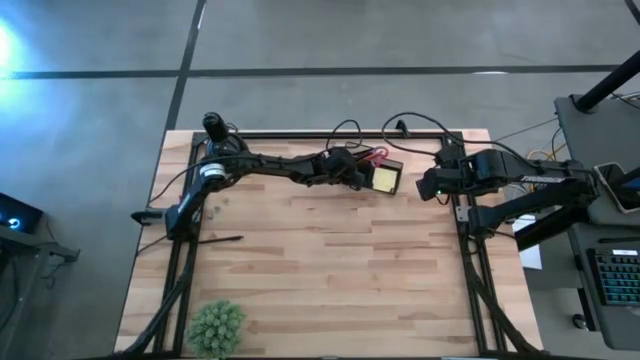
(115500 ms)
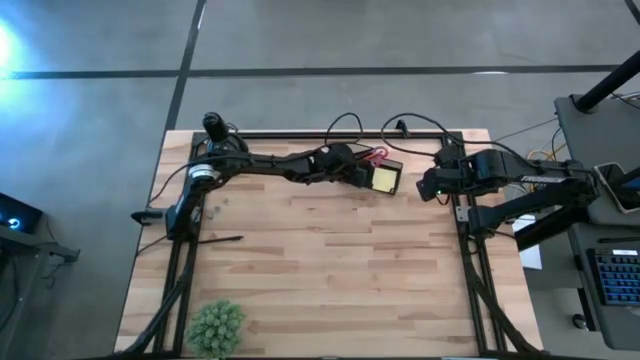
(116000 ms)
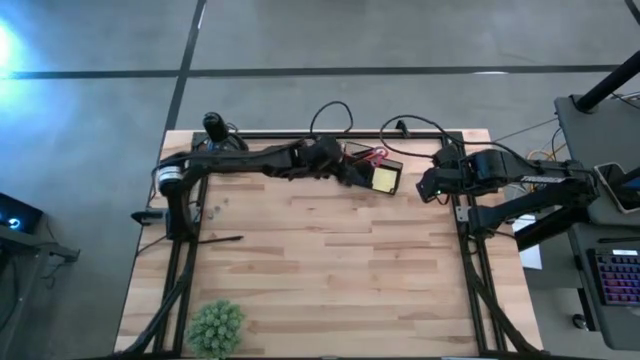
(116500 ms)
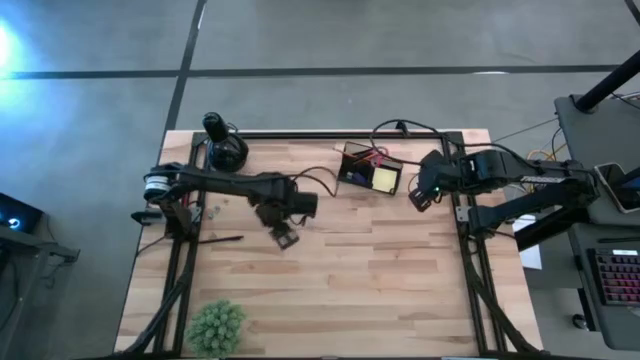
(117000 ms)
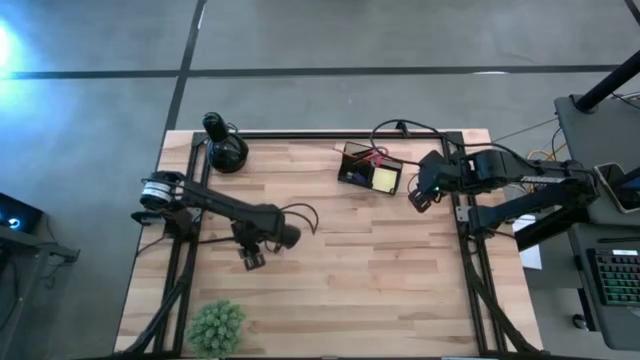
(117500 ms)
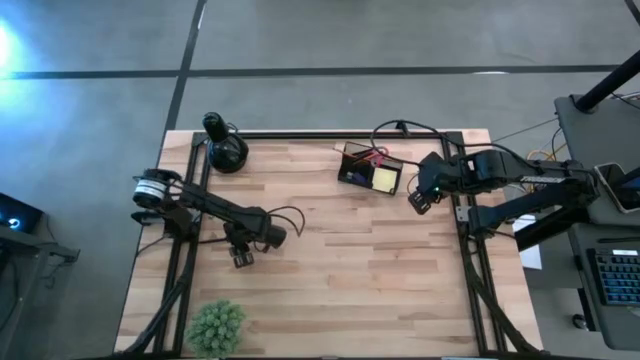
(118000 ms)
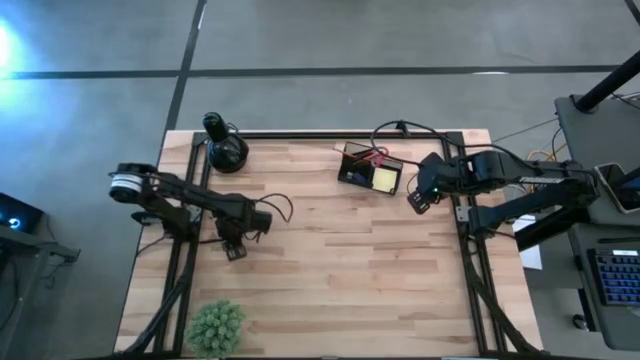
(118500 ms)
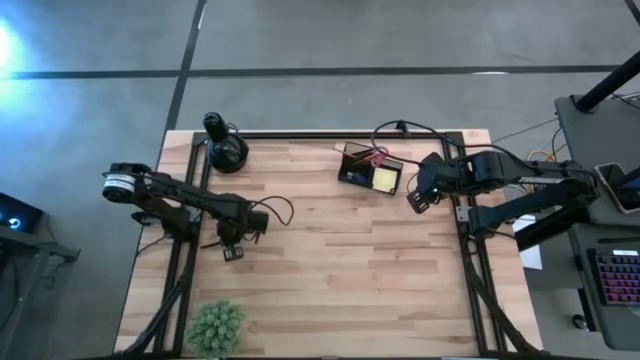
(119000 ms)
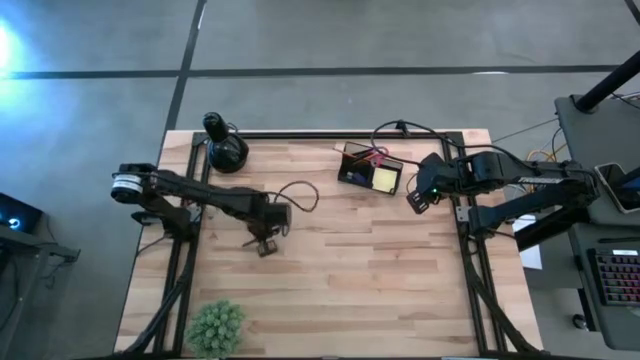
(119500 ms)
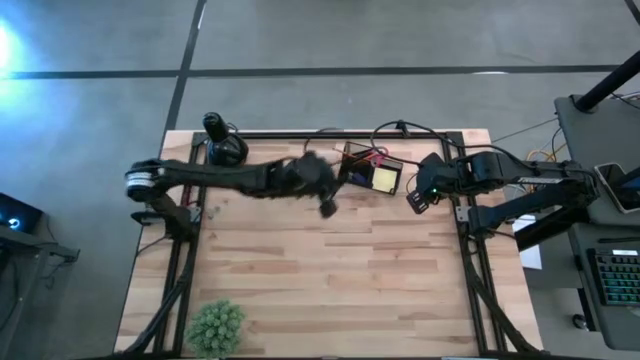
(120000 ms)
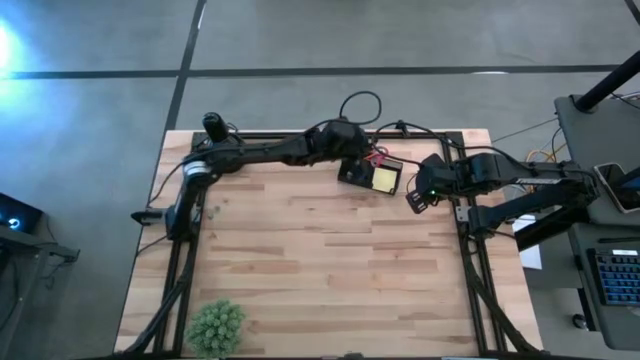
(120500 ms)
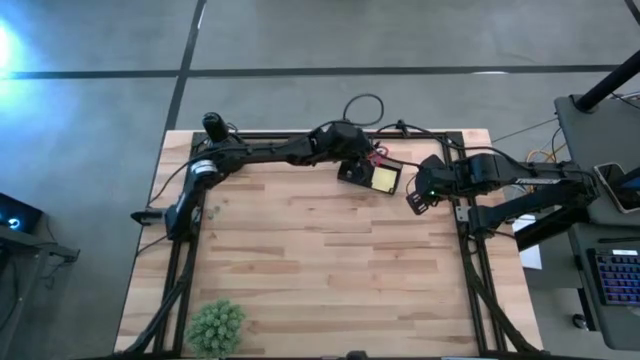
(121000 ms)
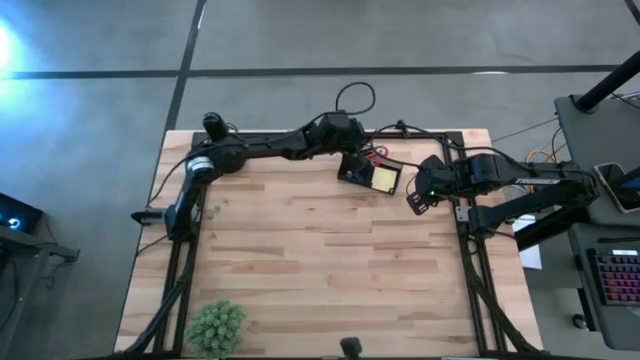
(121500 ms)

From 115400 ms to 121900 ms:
Task: Pick and place office supplies into organizer
Put the black pen into the desk organizer

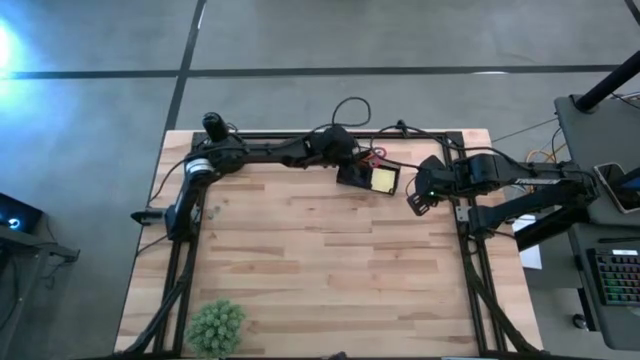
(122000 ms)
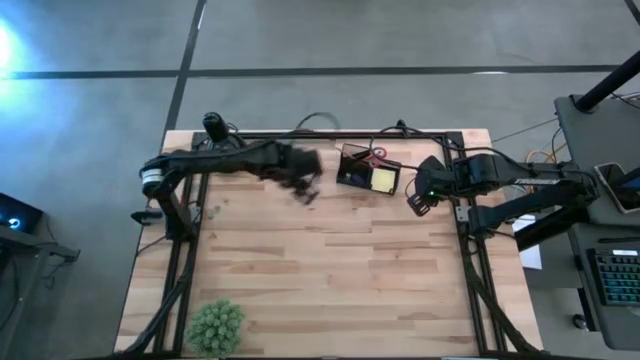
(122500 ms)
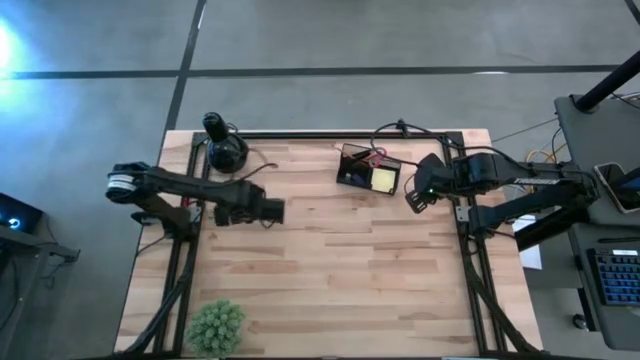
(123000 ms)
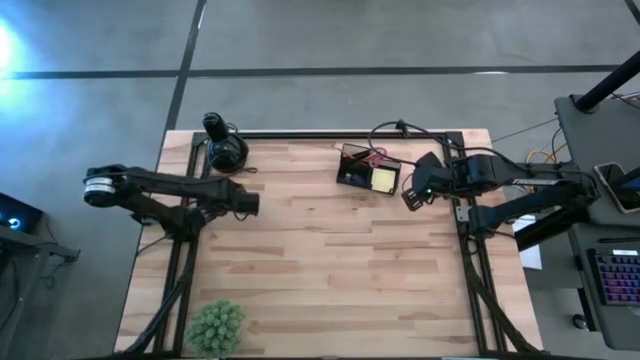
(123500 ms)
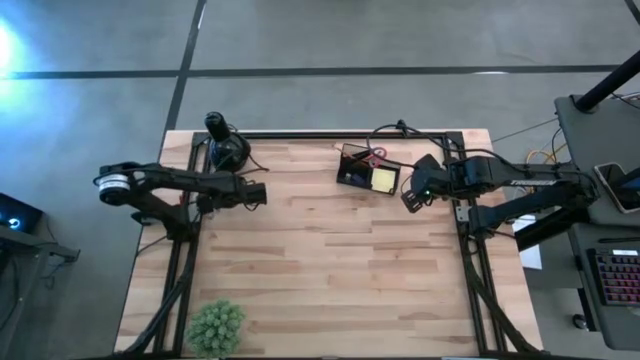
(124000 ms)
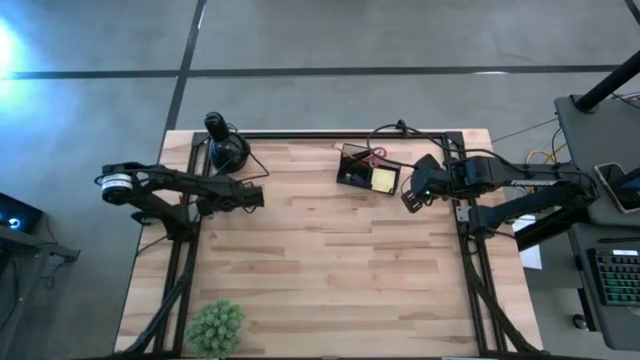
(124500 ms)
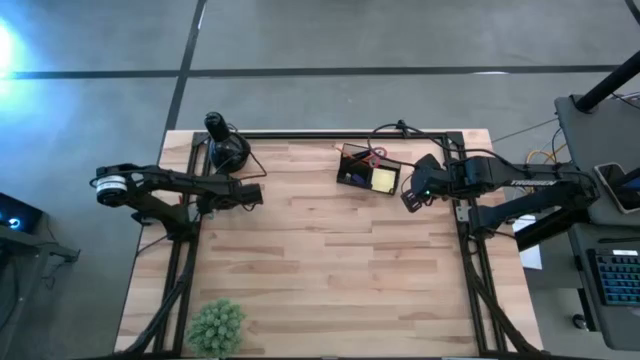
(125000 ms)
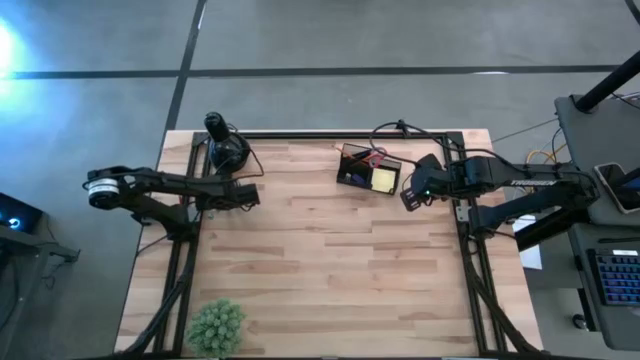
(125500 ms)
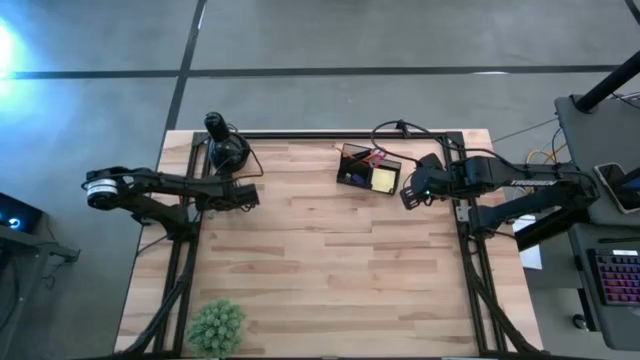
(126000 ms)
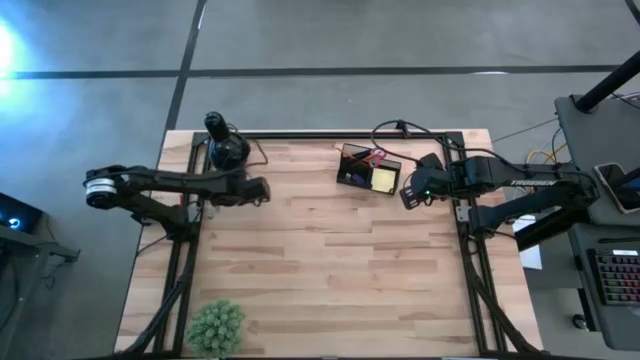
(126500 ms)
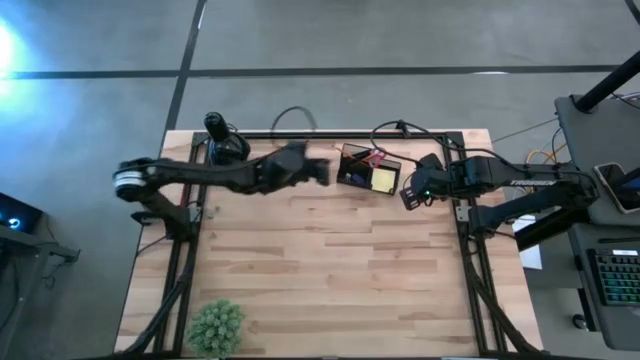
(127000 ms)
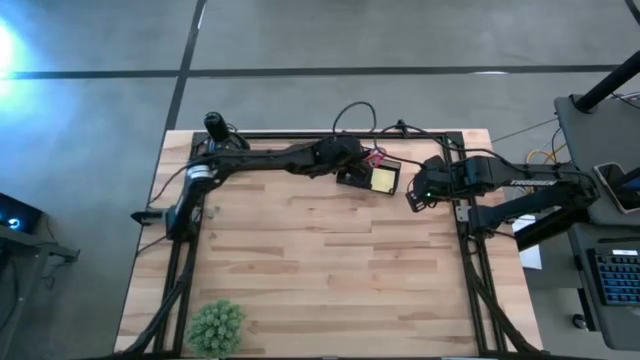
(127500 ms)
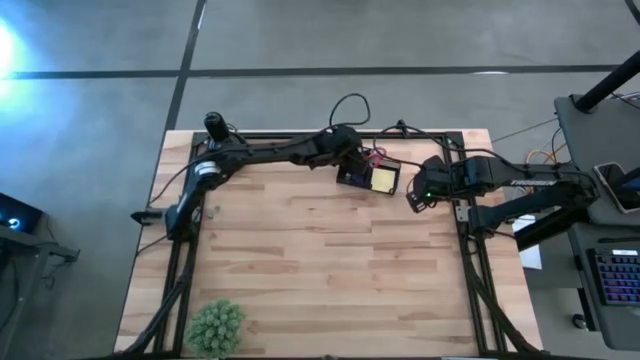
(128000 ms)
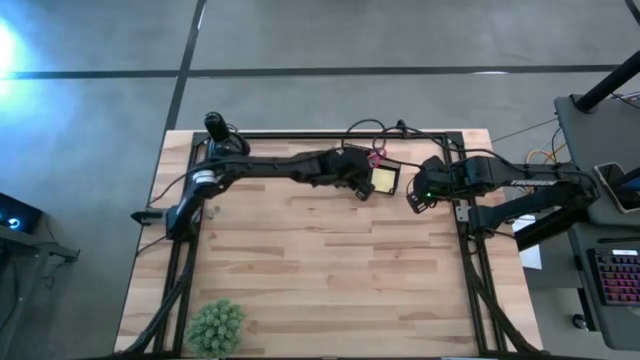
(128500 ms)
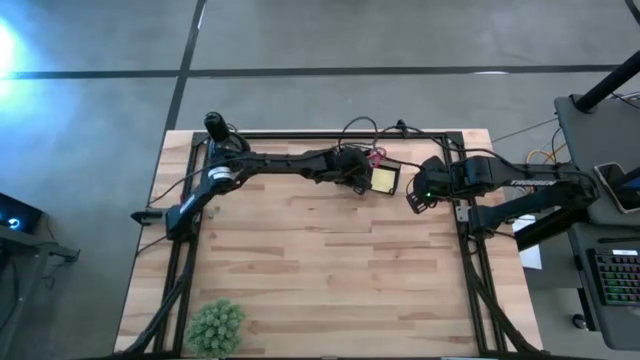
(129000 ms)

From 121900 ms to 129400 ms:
Put the yellow binder clip into the desk organizer

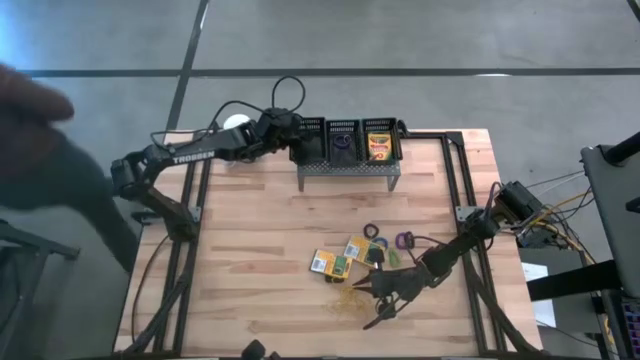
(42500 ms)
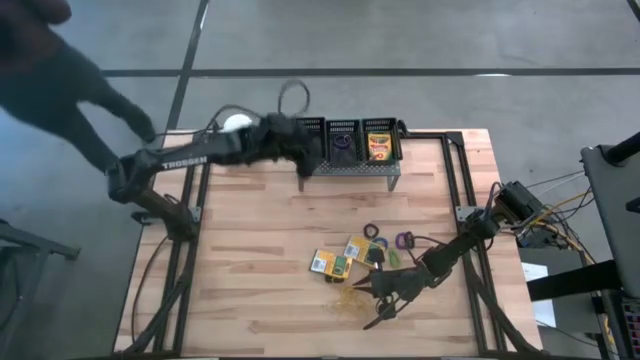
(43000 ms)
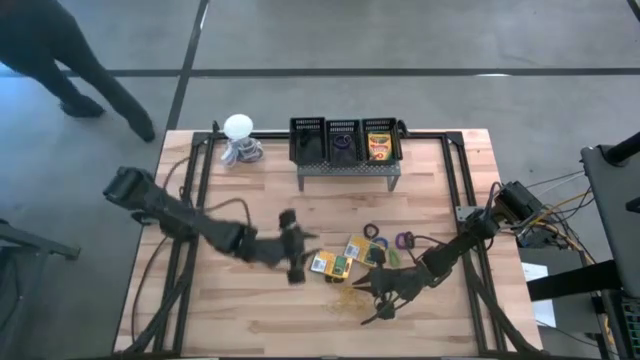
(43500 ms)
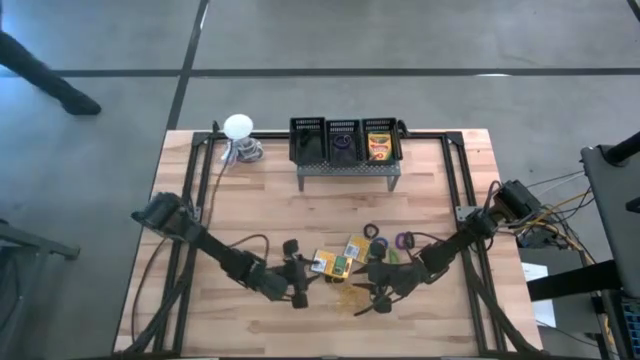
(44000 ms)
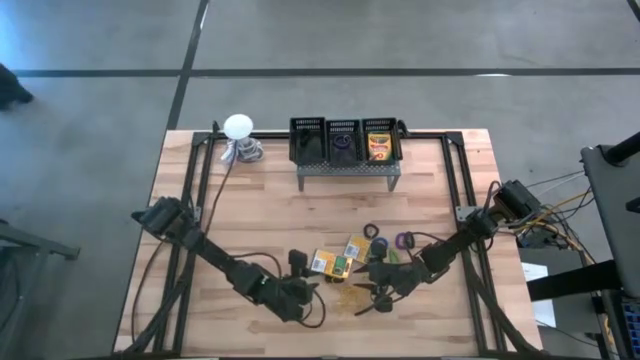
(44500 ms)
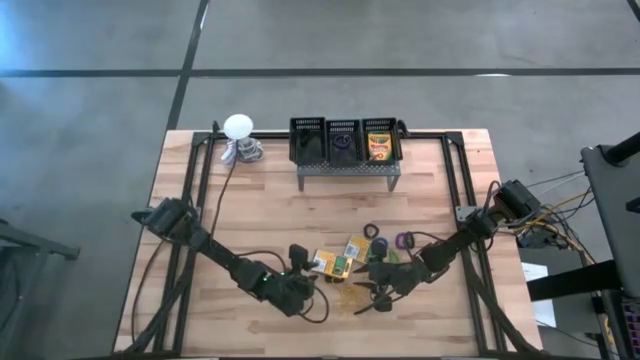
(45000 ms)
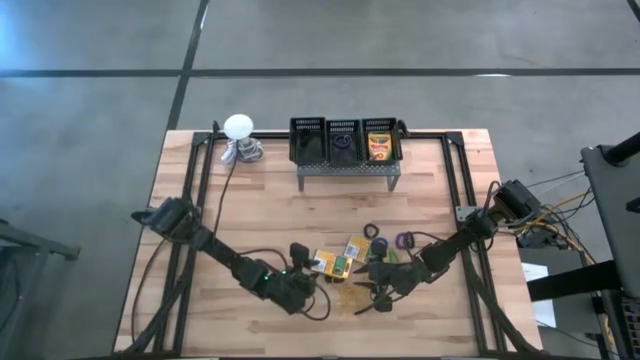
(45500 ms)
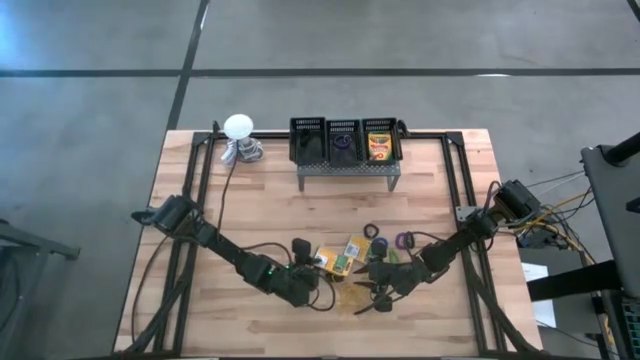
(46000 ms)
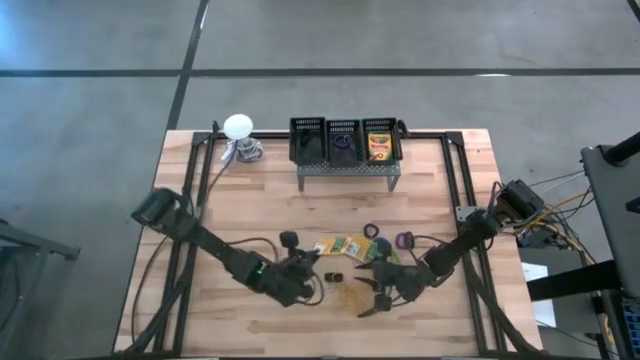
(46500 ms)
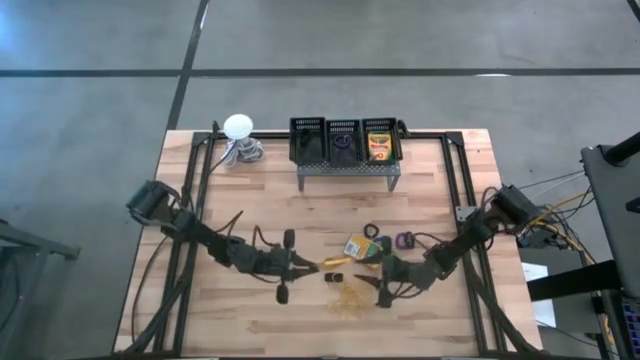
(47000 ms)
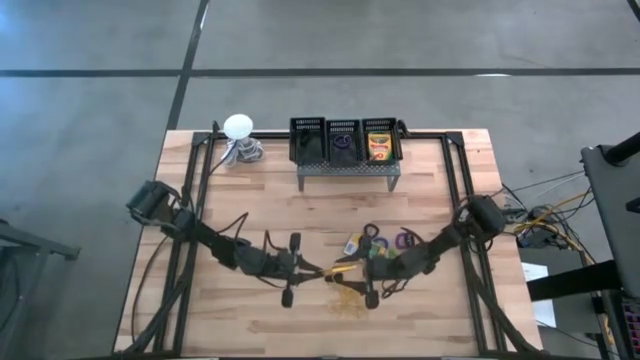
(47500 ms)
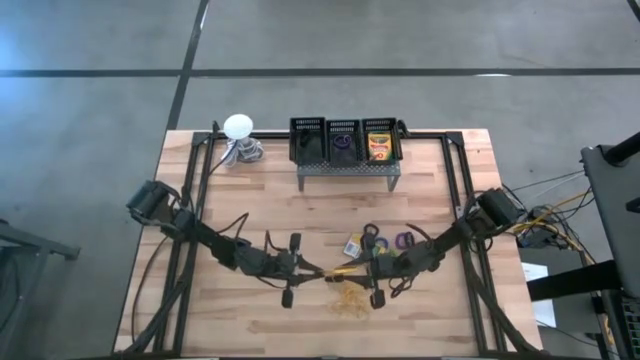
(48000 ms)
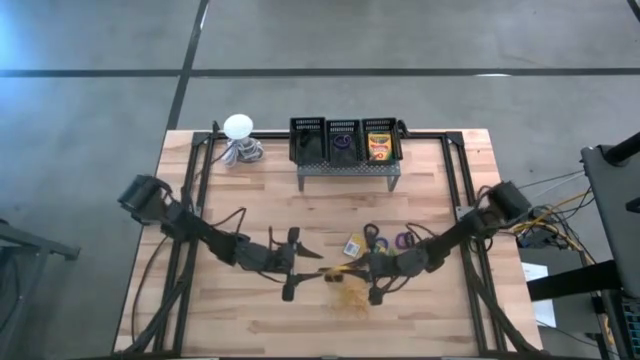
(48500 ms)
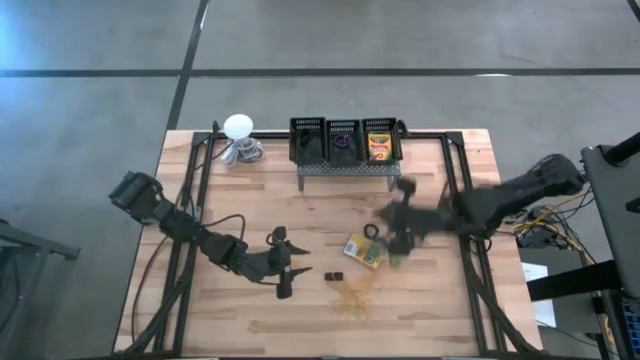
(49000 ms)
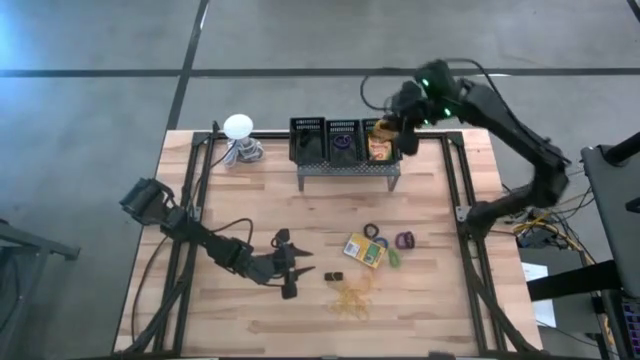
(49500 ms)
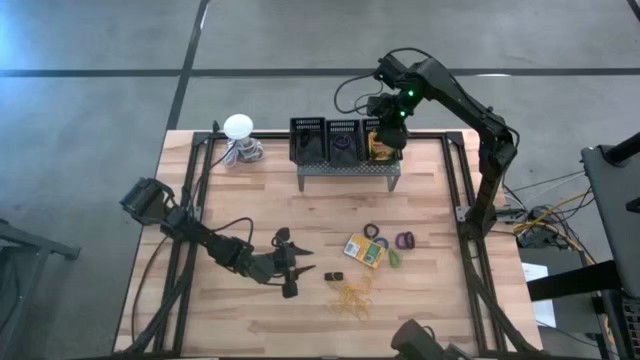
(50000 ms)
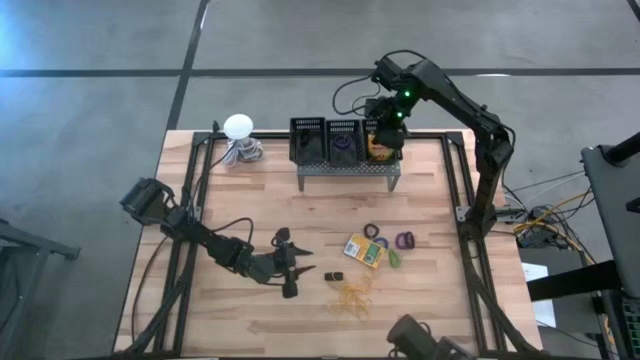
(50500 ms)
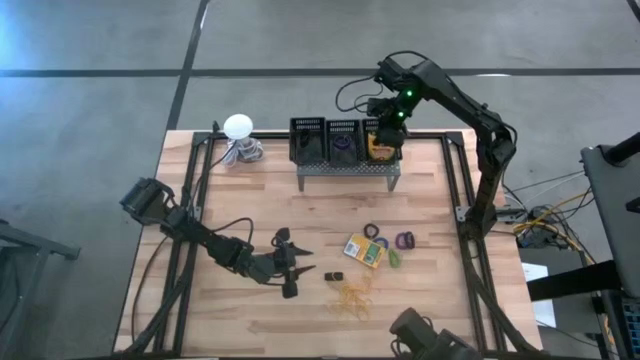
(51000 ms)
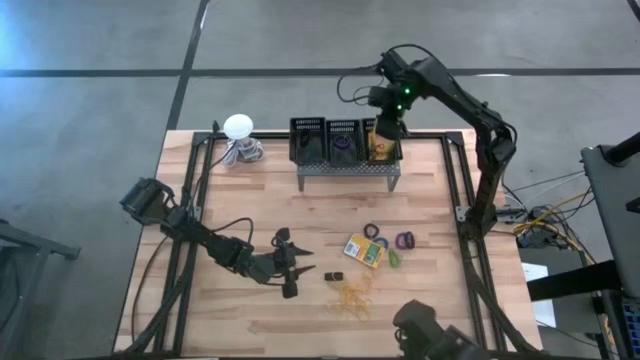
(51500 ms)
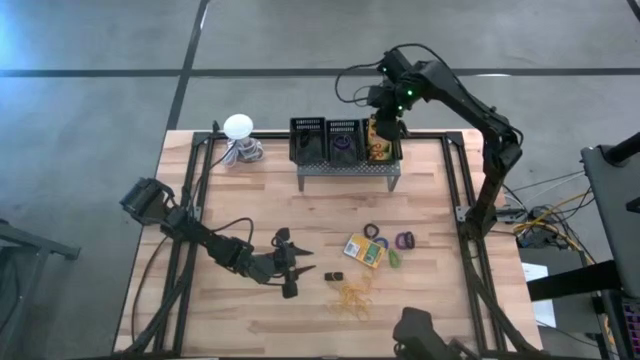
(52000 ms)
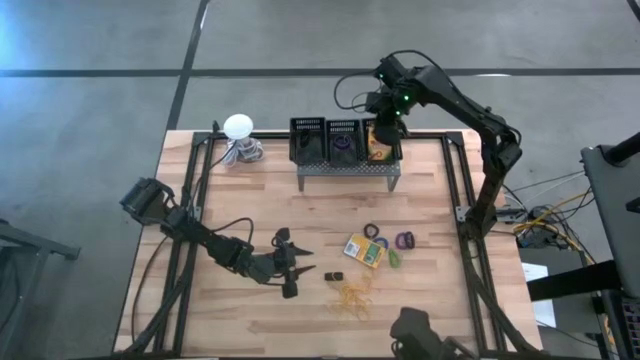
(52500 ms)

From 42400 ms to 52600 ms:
Task: Pick & Place Office Desk Supplies
Put the yellow crayon box into the right black bin on the shelf
